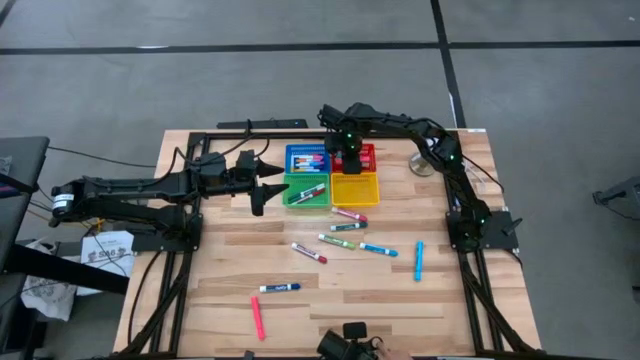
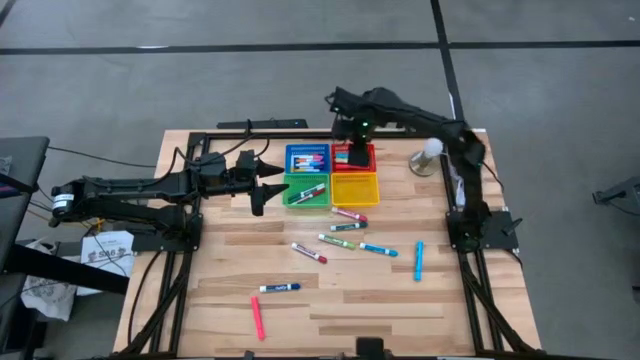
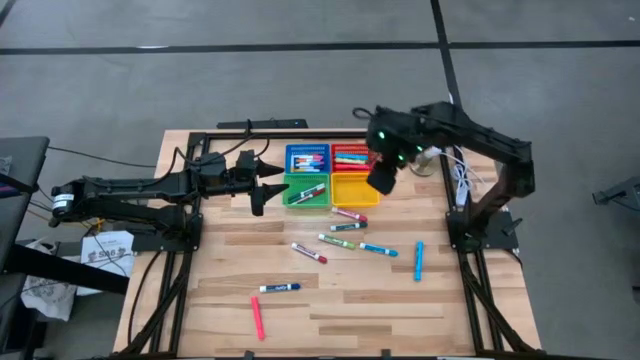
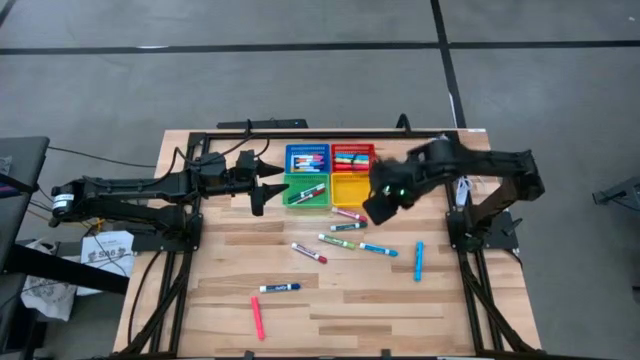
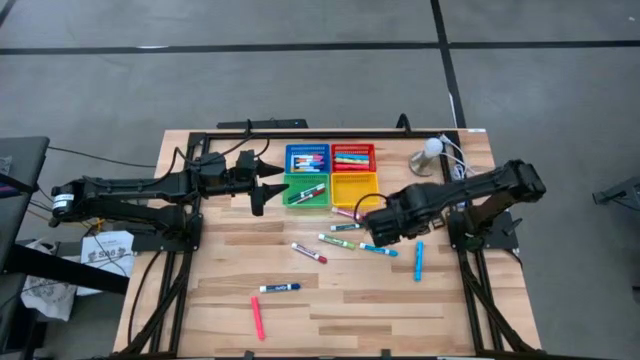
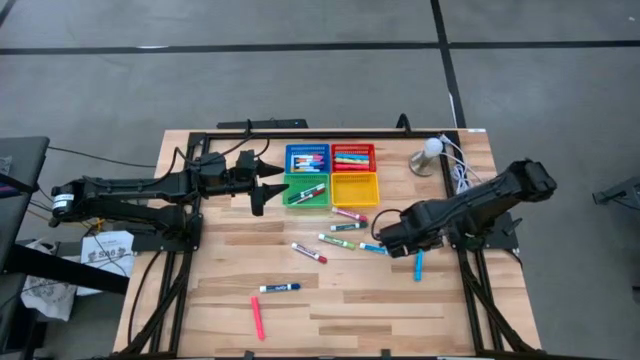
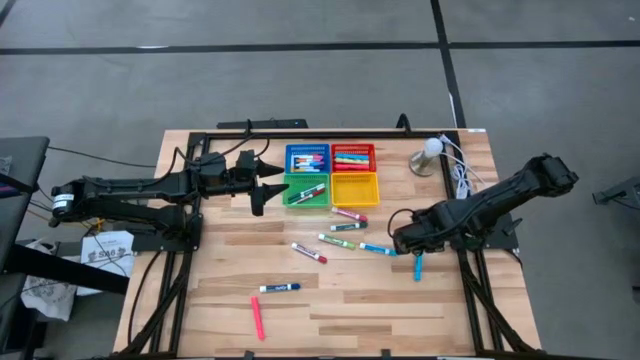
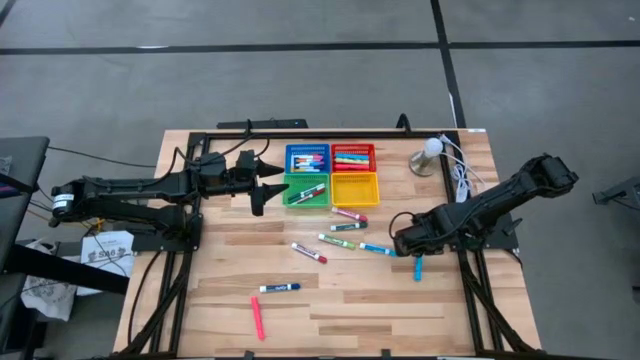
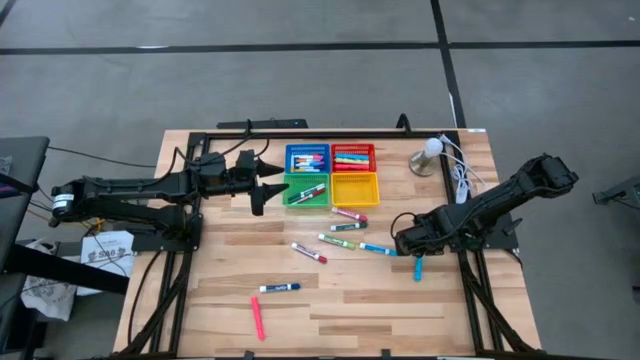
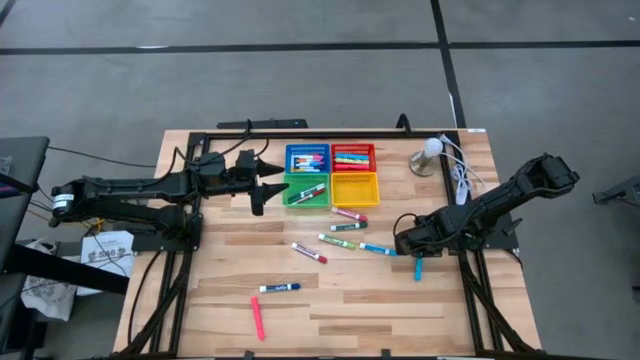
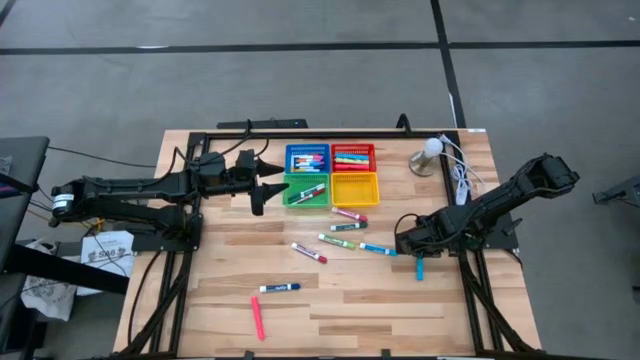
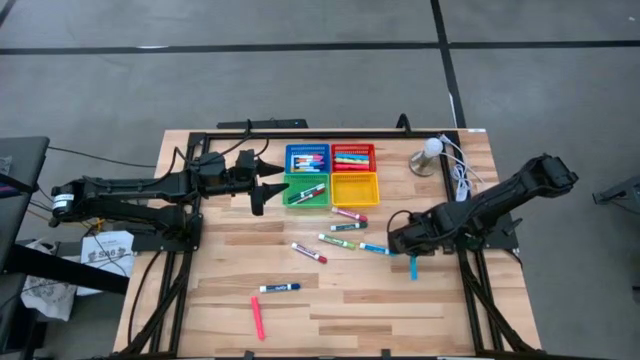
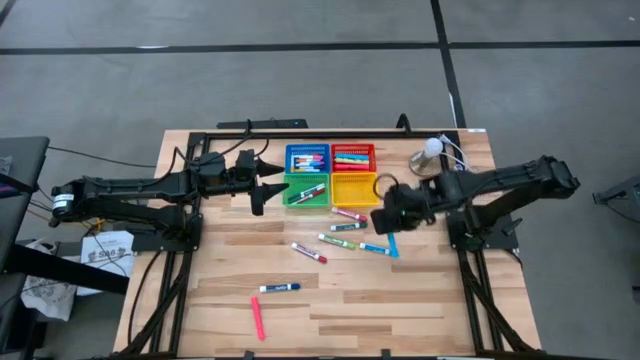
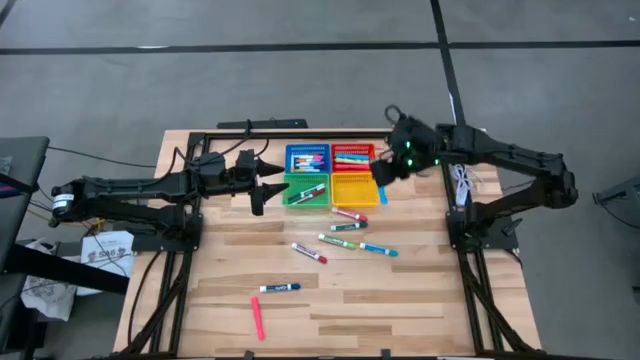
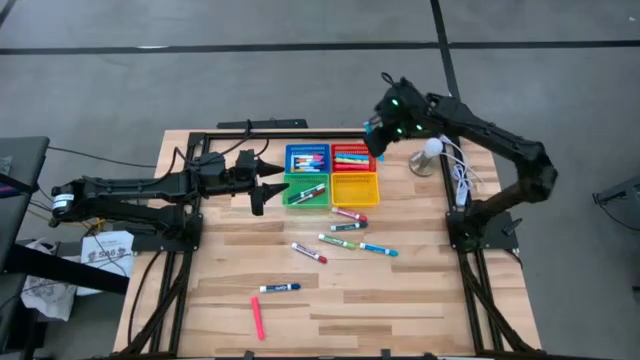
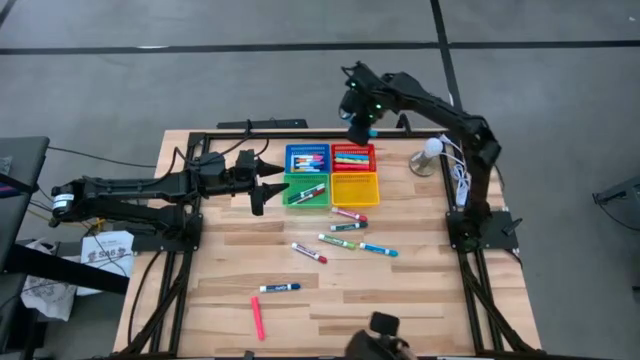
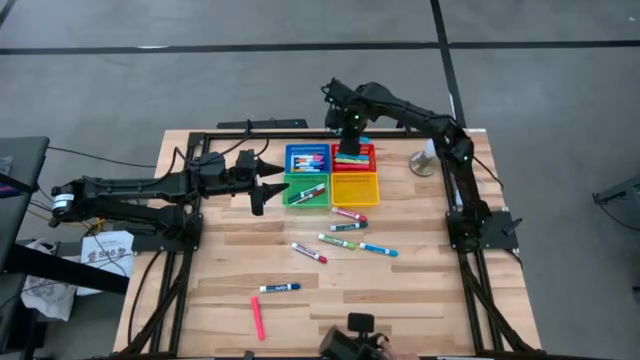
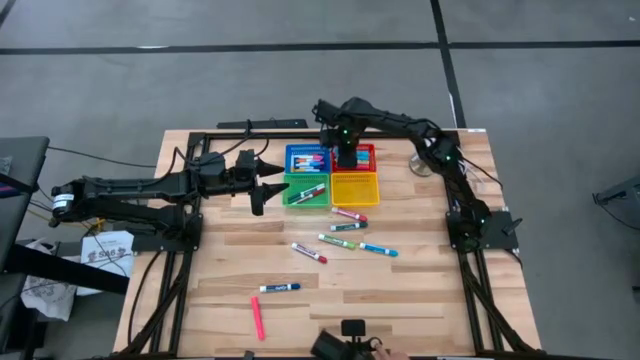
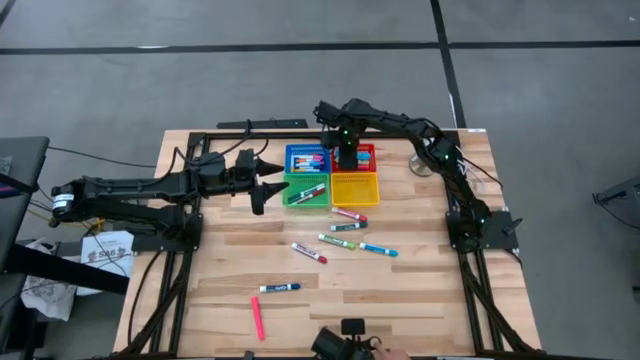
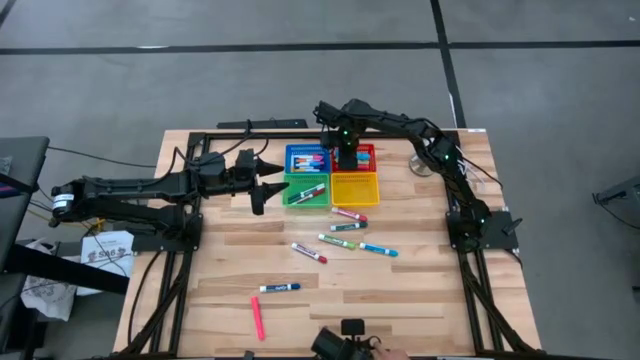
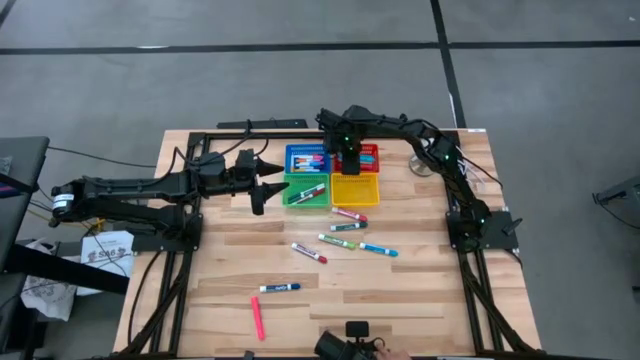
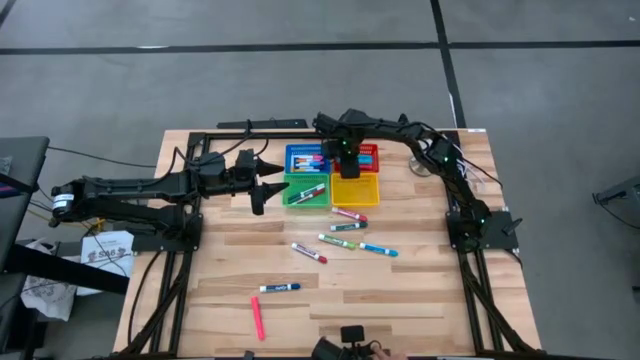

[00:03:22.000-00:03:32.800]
Task: Pick & Place Markers
Put the large light blue highlighter into the red bin

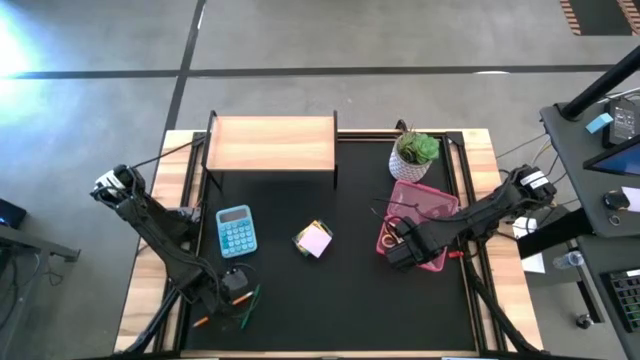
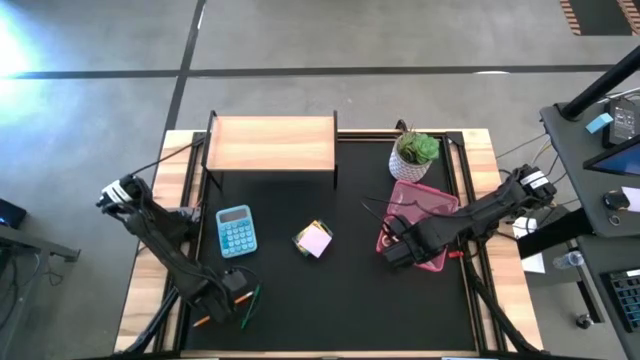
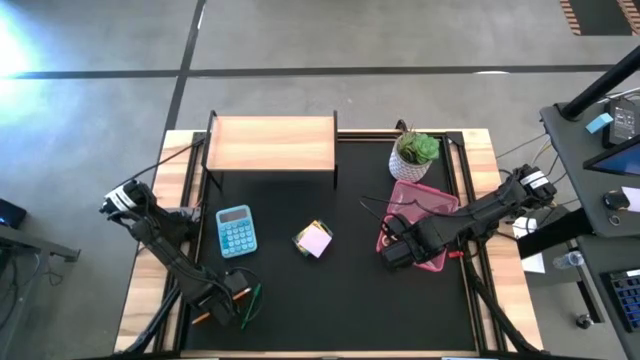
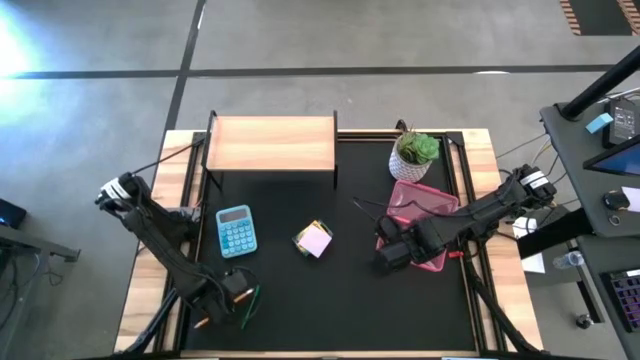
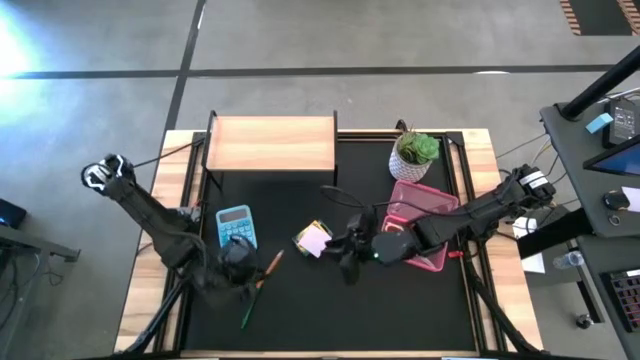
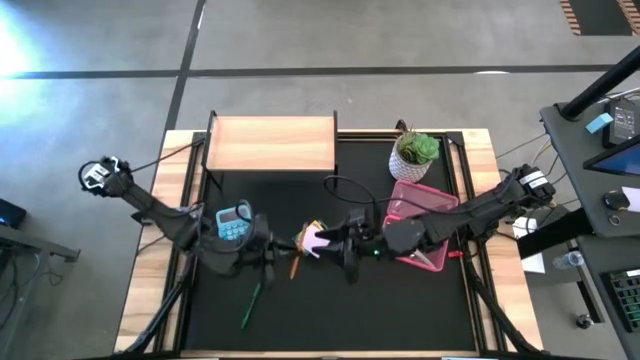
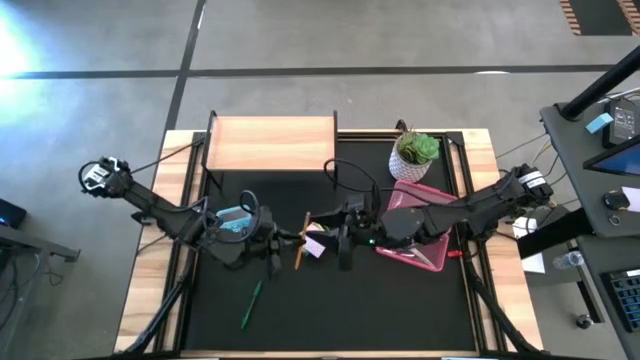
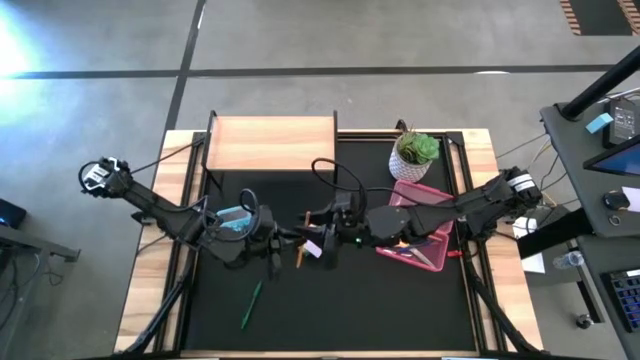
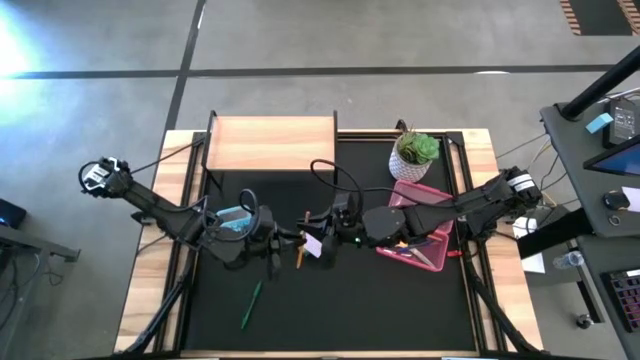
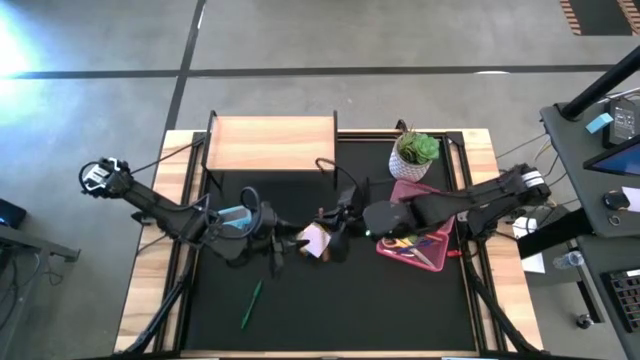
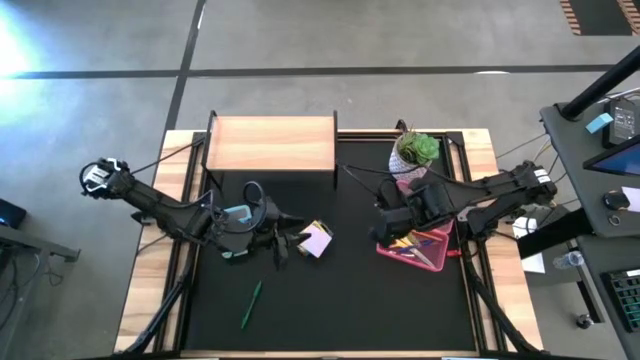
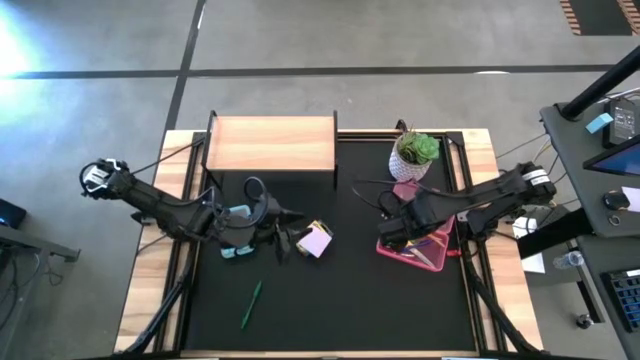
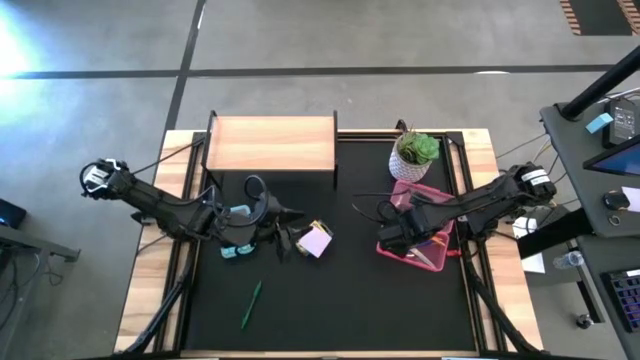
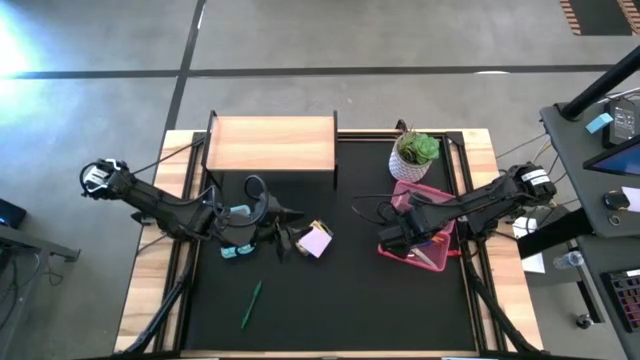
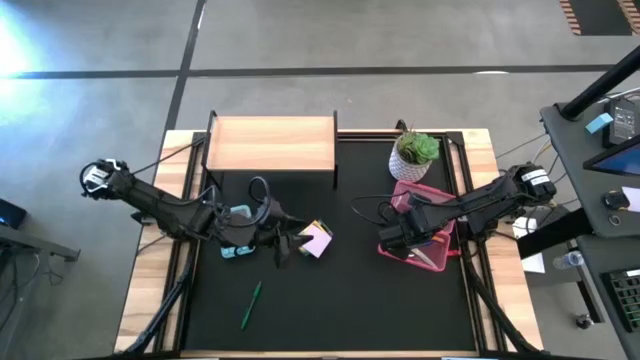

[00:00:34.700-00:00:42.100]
Task: Pack school essentials
Put the orange pencil into the pink supply box
